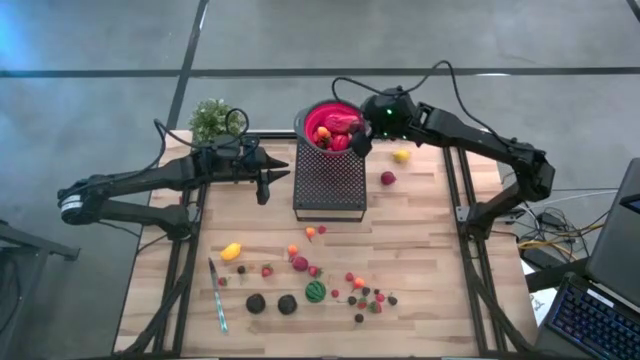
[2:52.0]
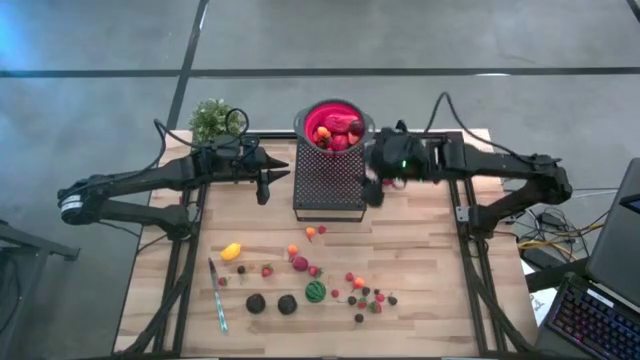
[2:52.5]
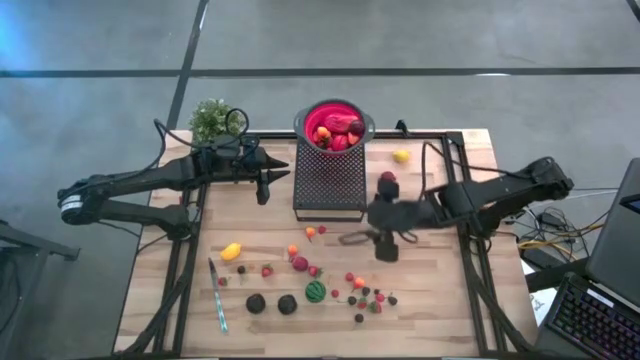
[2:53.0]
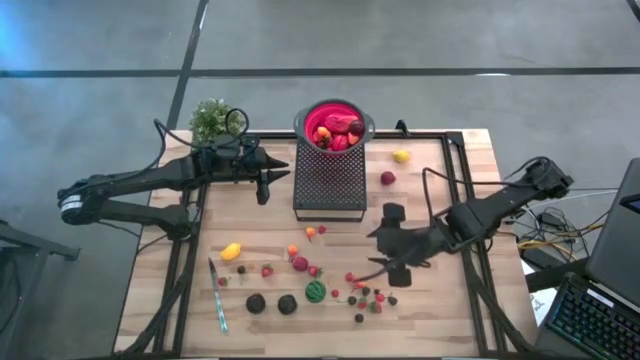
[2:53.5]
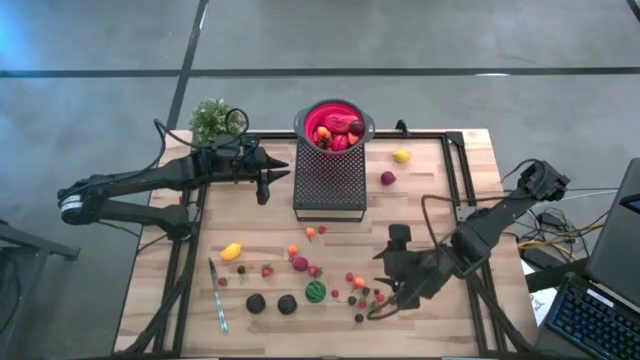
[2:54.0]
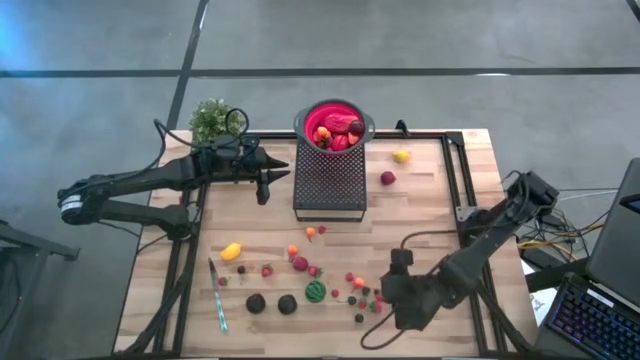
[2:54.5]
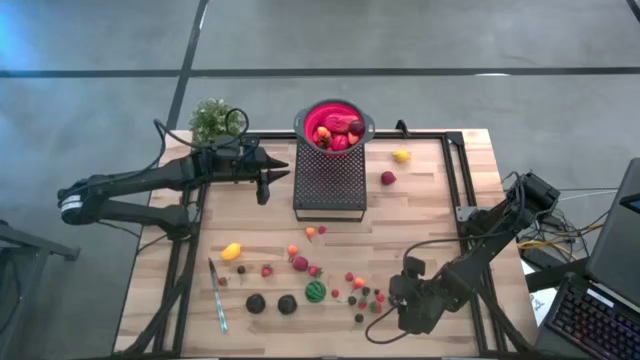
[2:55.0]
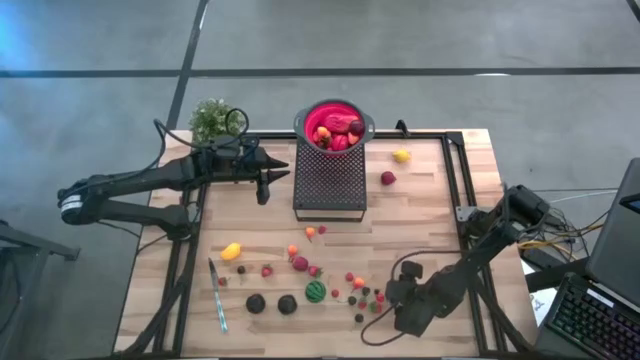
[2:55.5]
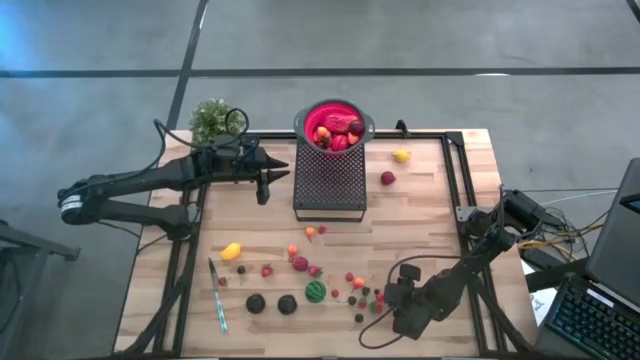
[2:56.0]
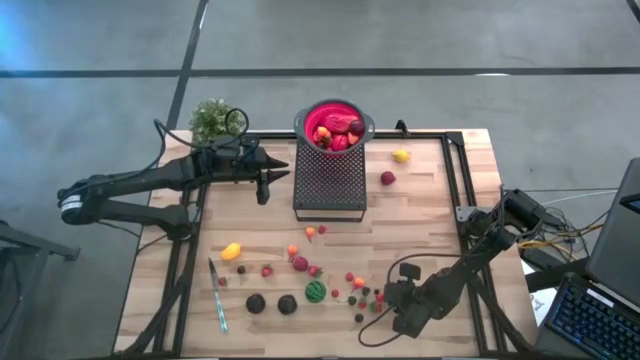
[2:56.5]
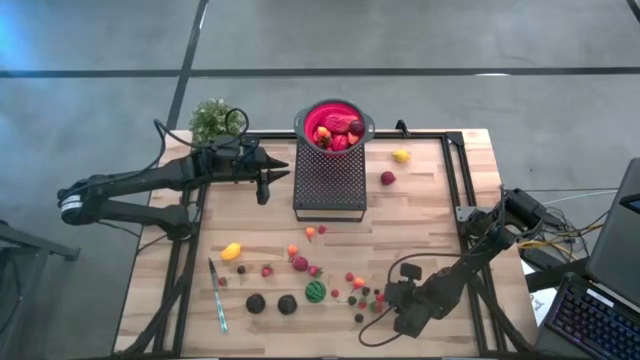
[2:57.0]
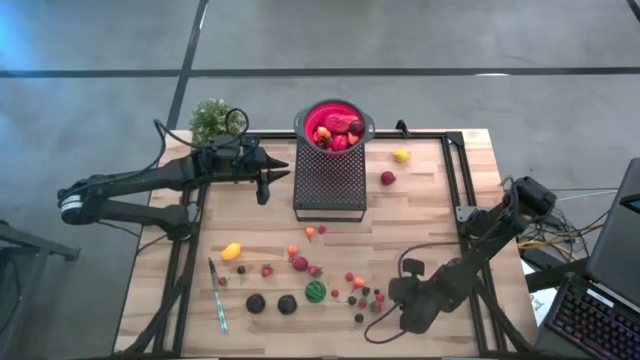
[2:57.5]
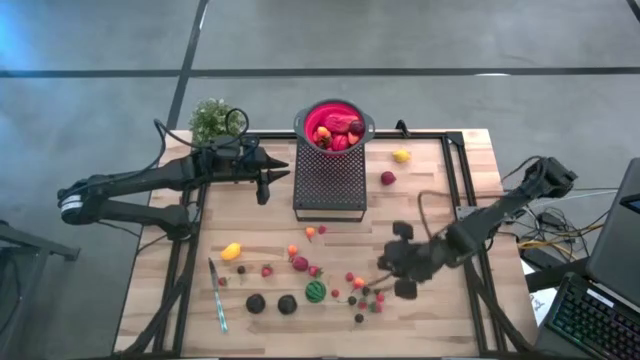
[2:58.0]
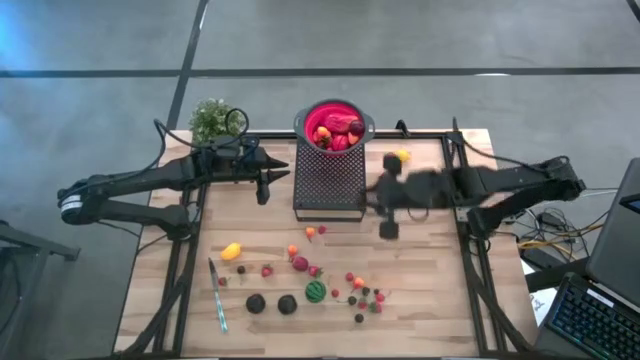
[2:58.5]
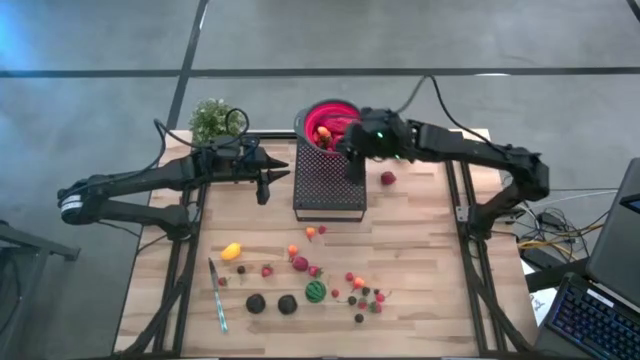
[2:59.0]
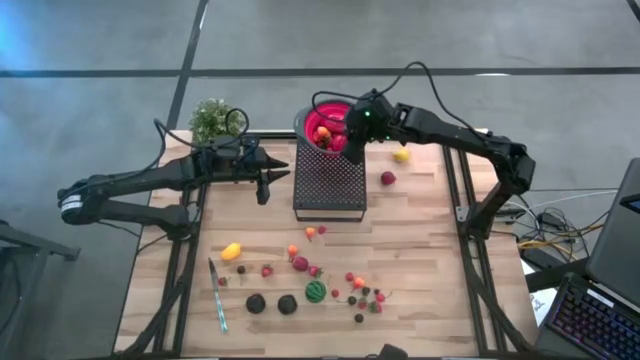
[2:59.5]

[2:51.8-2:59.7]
Task: Pick & Place Fruit
Put the black berry into the red strainer bowl on the shelf

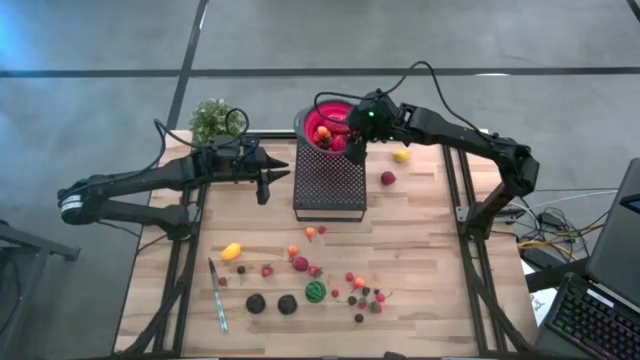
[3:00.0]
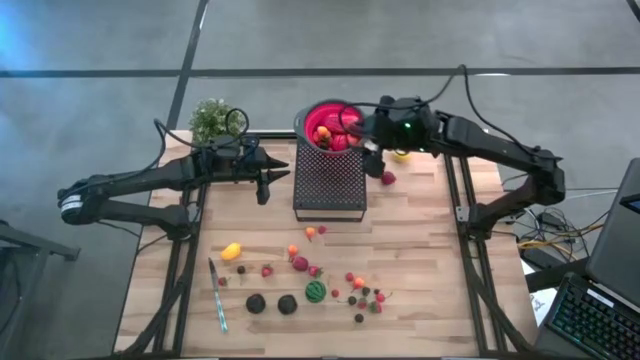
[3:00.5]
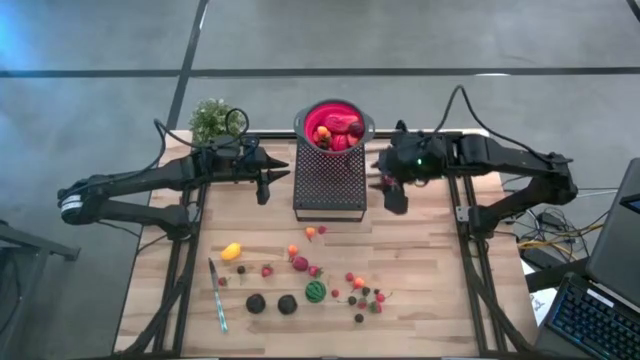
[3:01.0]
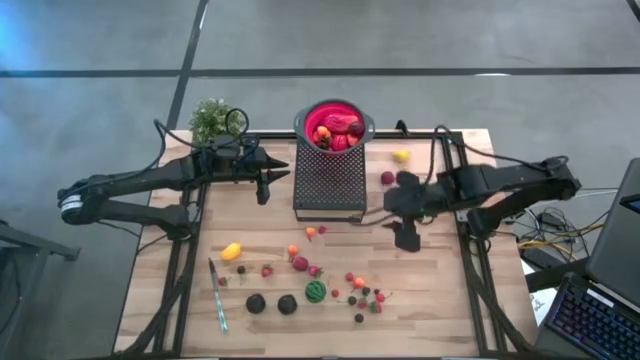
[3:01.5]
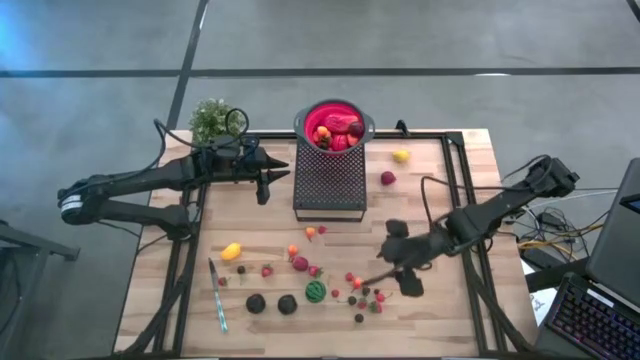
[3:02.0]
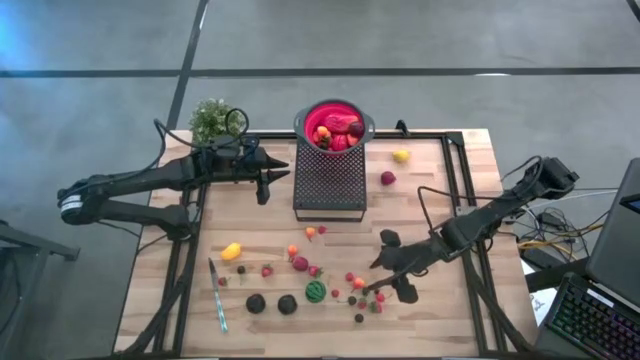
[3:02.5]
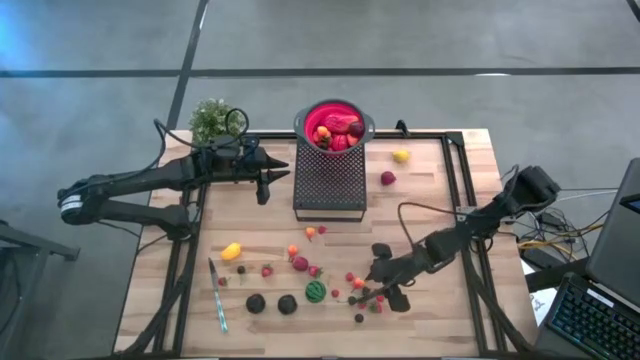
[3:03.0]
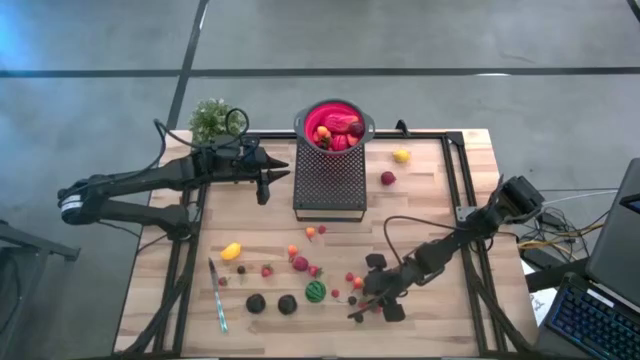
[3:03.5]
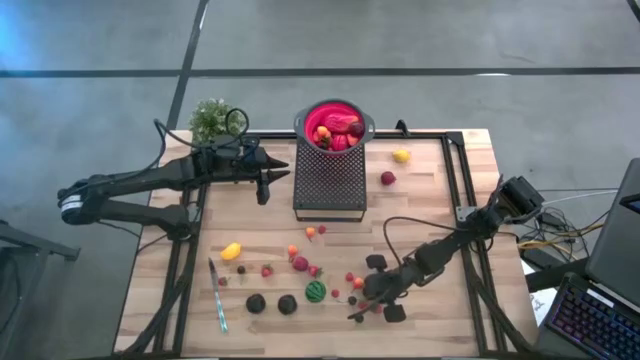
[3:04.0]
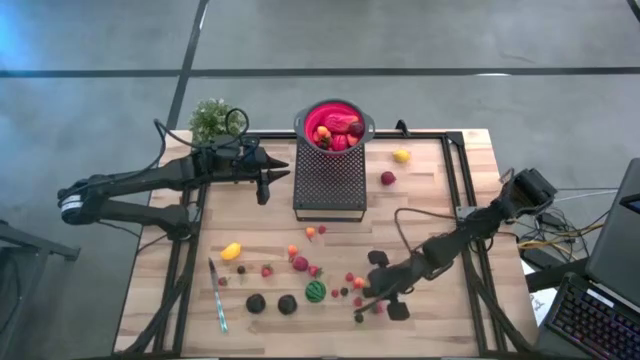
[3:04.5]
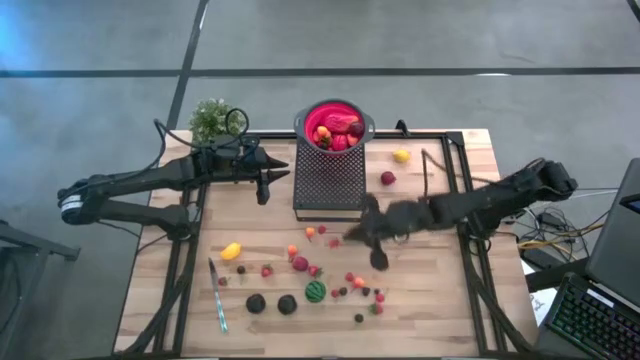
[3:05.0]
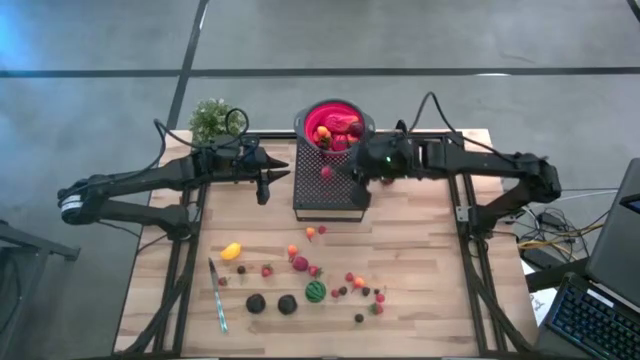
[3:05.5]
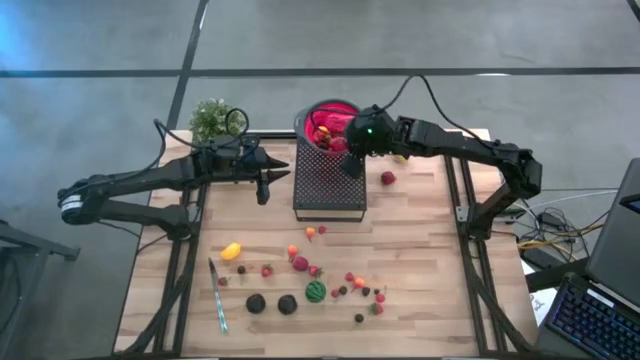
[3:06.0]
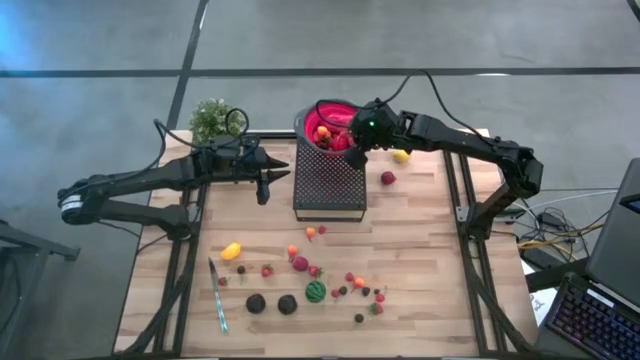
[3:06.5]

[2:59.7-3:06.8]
Put the strawberry into the red strainer bowl on the shelf

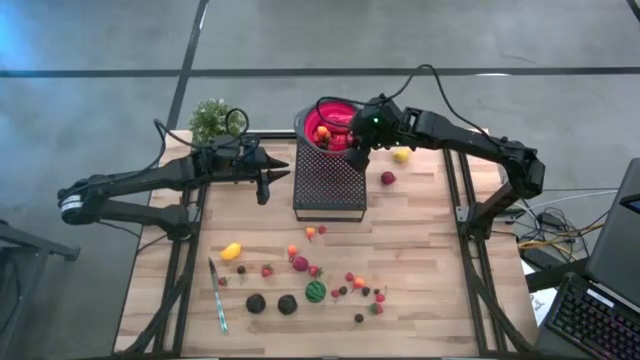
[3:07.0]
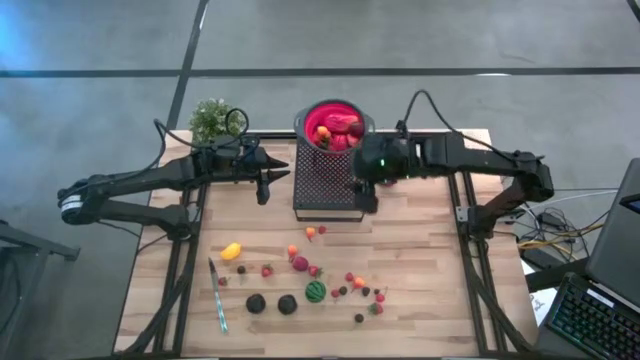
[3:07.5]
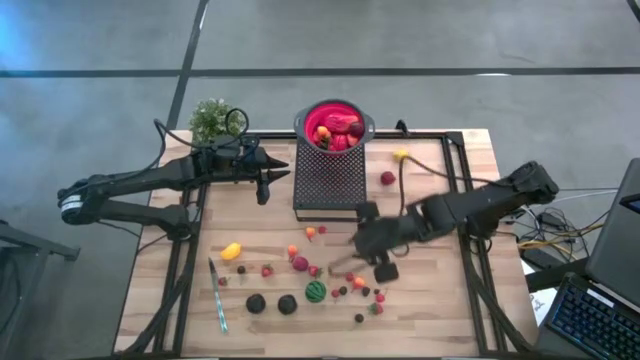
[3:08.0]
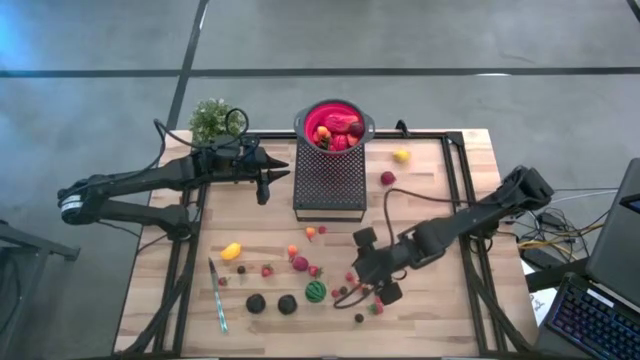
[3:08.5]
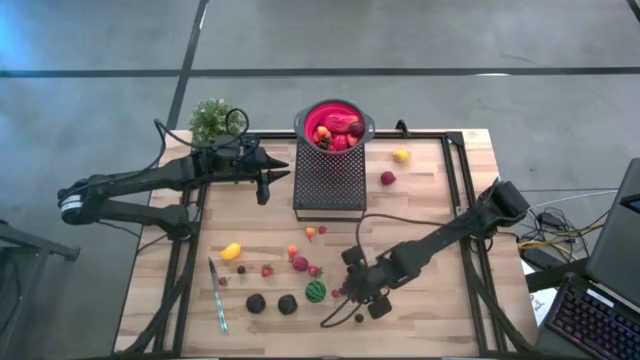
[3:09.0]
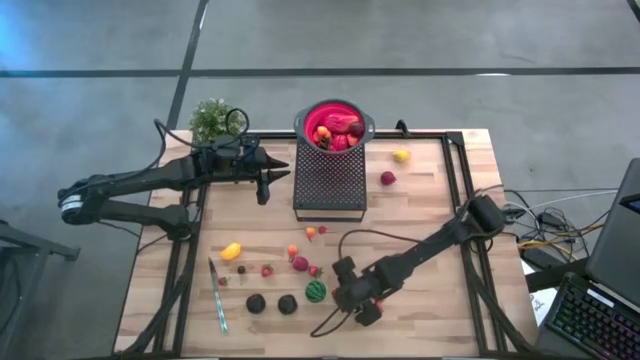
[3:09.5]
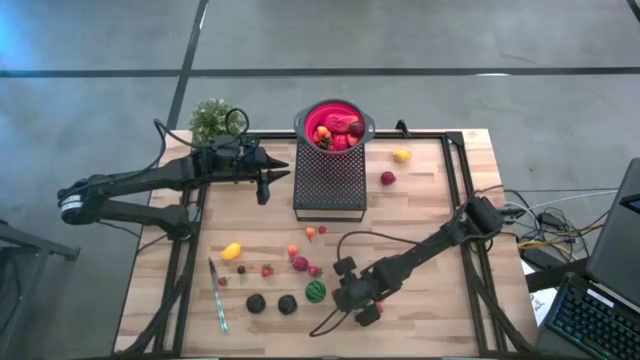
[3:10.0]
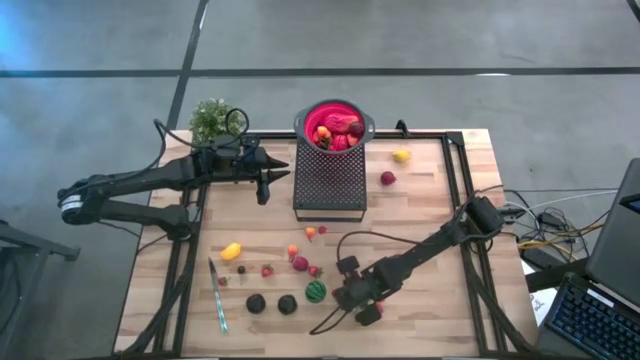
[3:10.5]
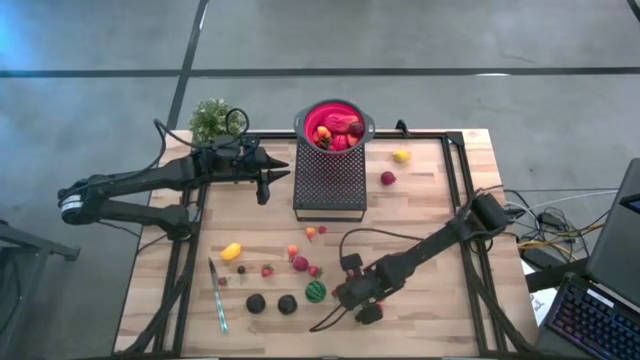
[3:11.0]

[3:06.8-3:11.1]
Put the black cherry into the red strainer bowl on the shelf

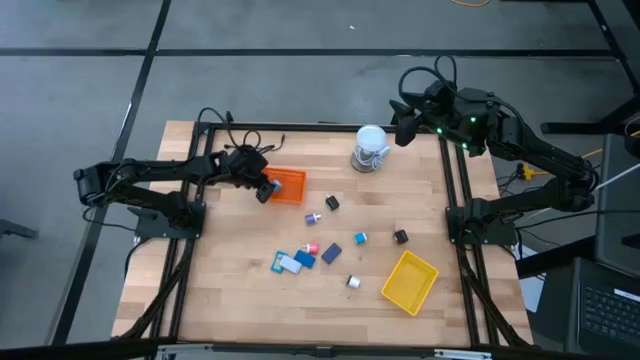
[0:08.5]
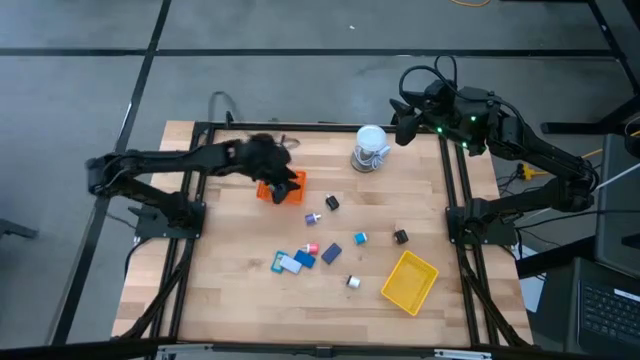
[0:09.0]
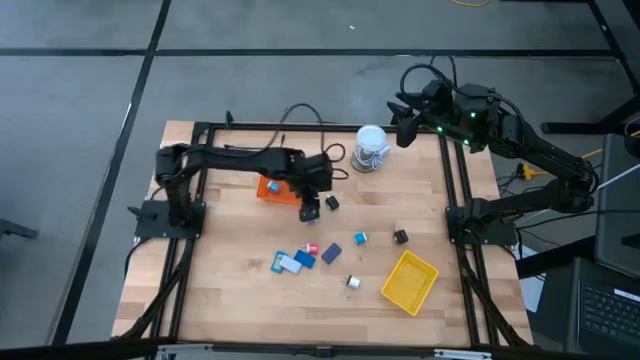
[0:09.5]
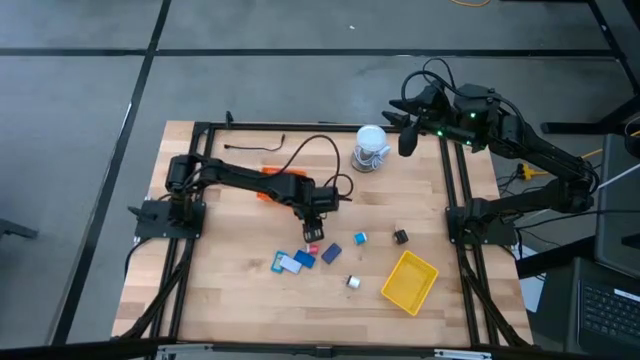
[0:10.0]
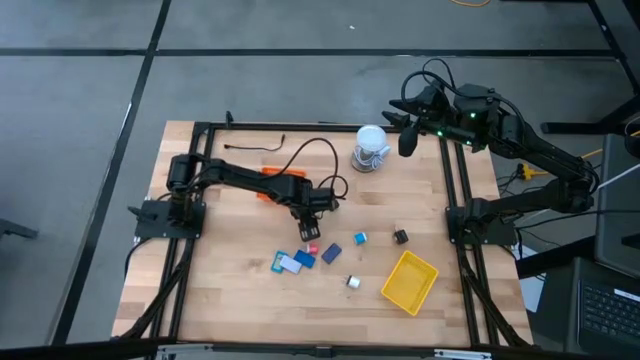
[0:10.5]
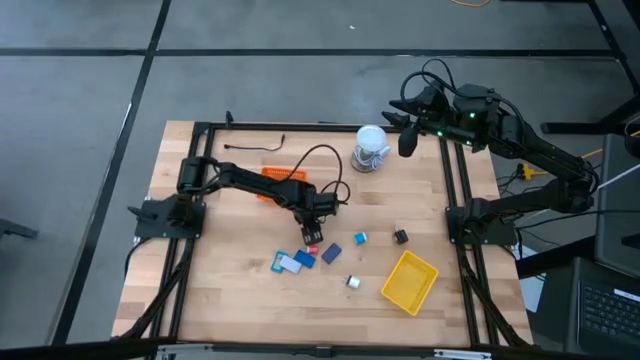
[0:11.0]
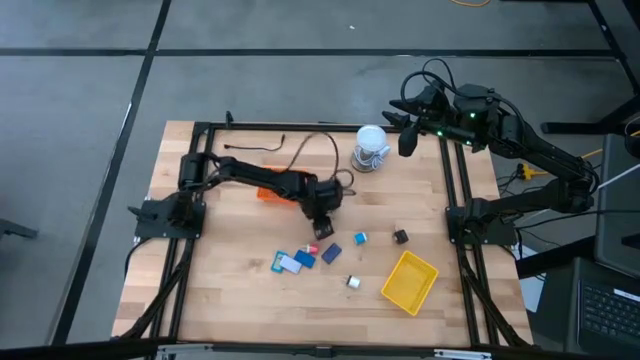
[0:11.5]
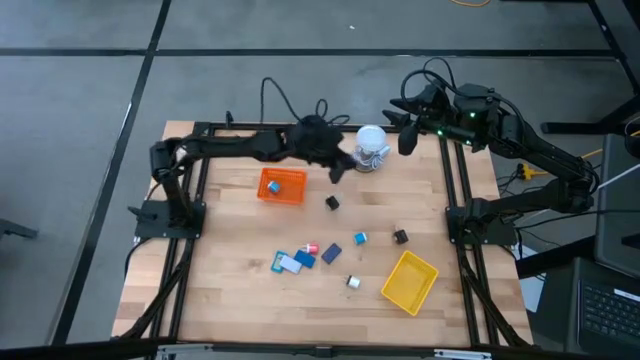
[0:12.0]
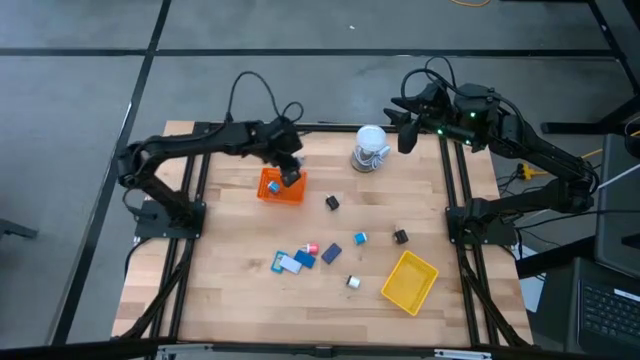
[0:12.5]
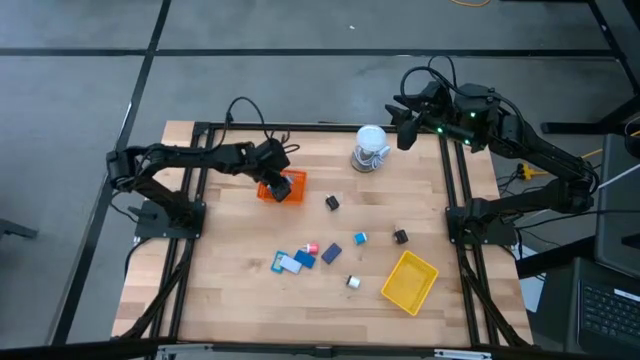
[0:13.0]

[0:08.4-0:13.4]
Task: Pick & Place Office items
Put the purple charger adapter into the orange basket
